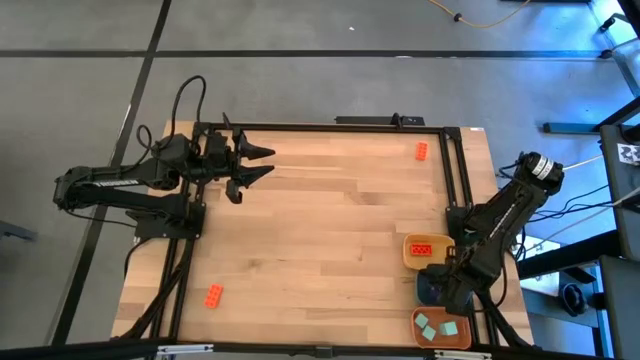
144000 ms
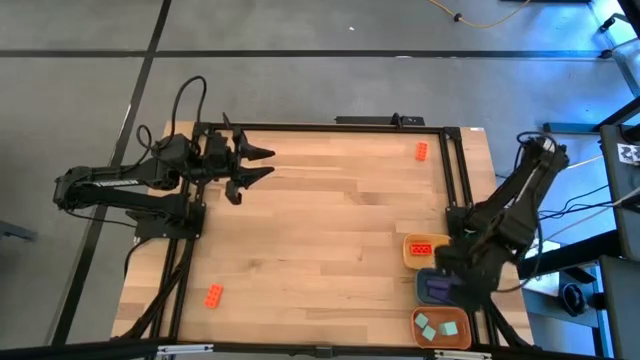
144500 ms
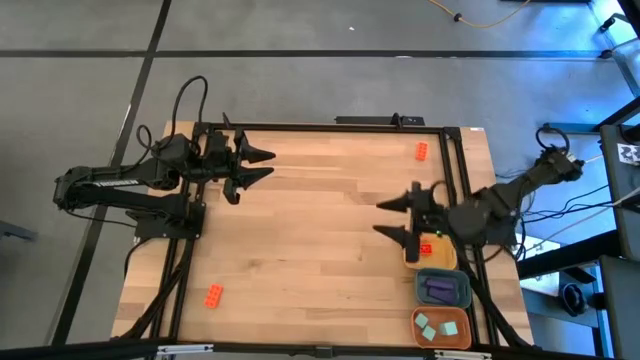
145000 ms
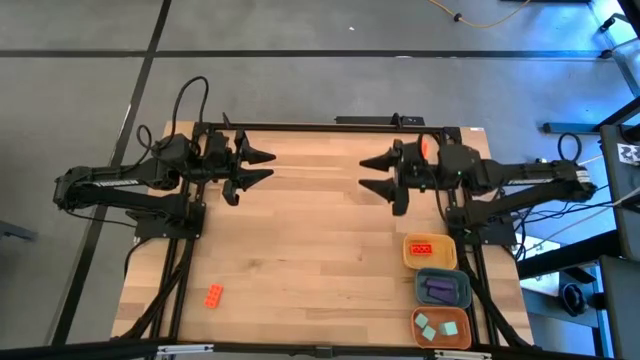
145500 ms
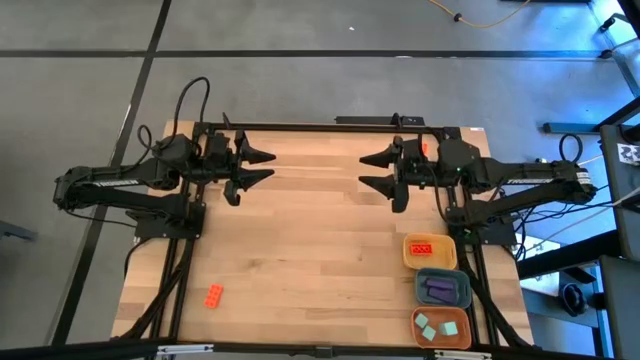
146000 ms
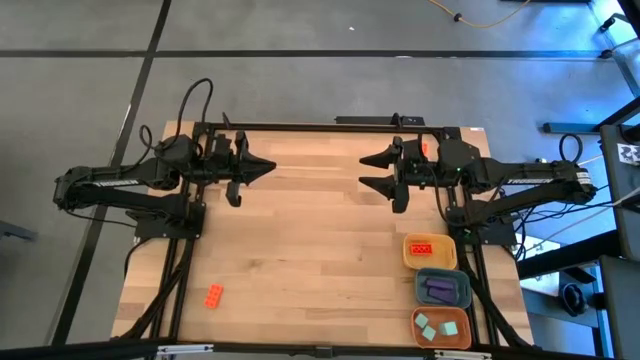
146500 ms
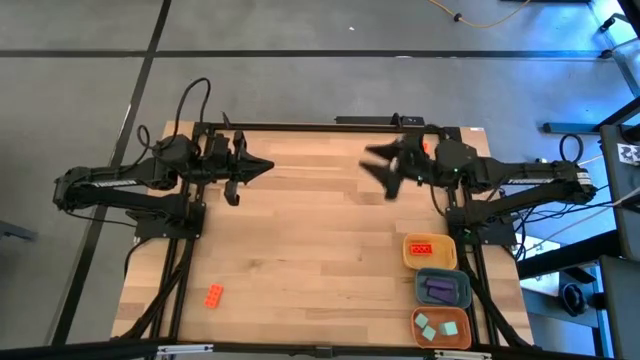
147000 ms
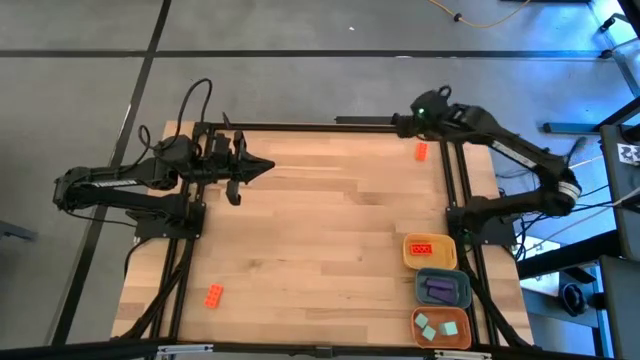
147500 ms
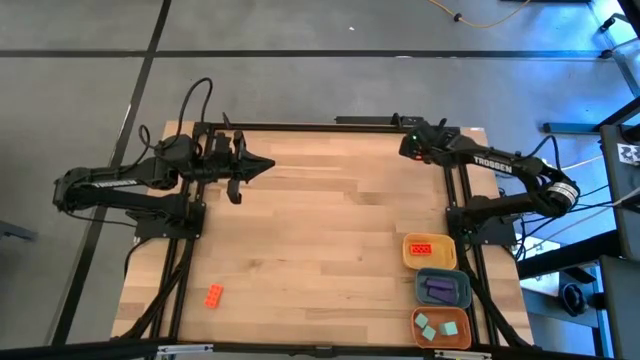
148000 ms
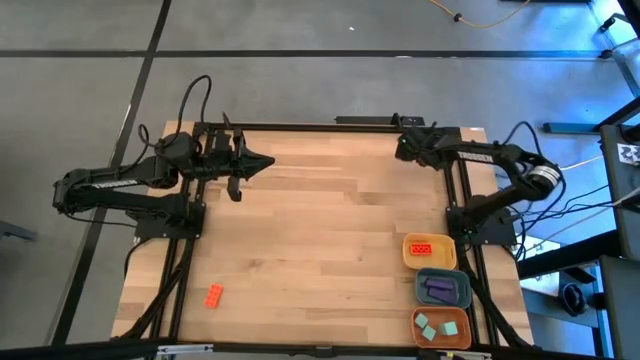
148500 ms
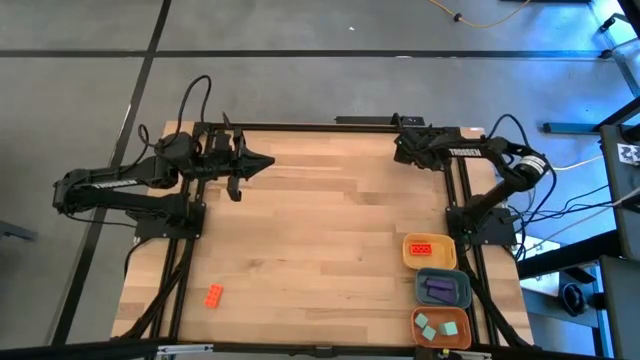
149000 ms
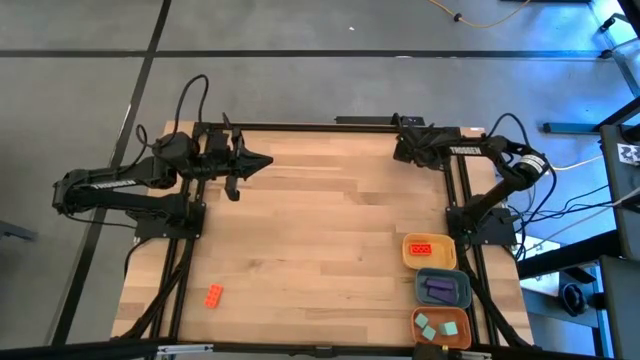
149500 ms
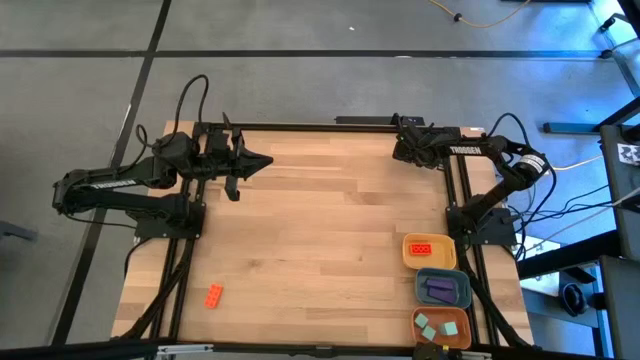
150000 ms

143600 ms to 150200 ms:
Task: Sort & place blocks by color
Put the top orange game piece into the yellow bin

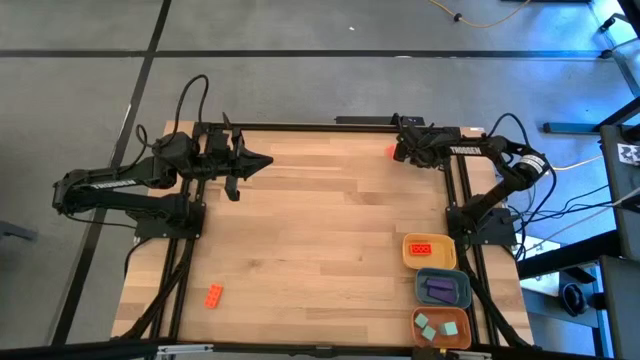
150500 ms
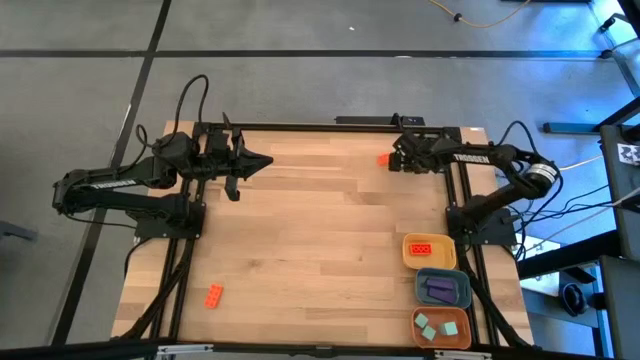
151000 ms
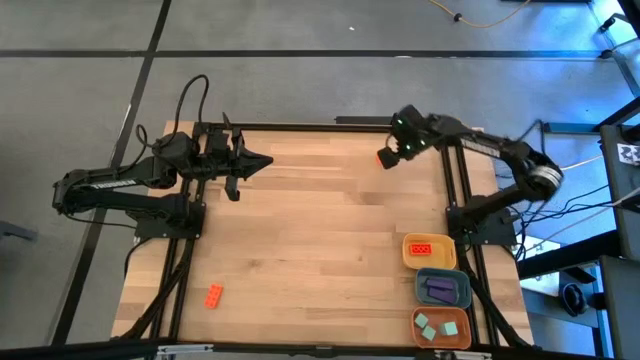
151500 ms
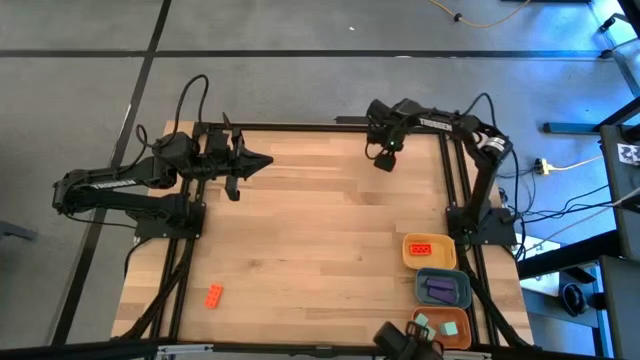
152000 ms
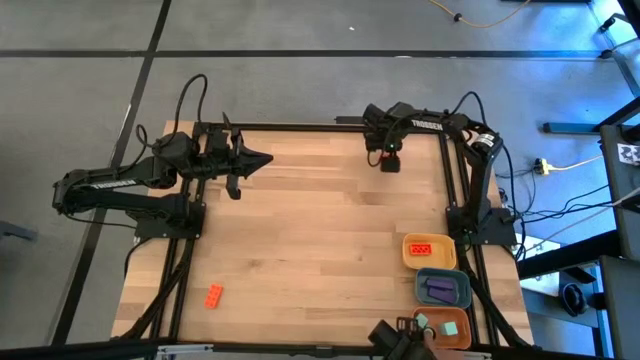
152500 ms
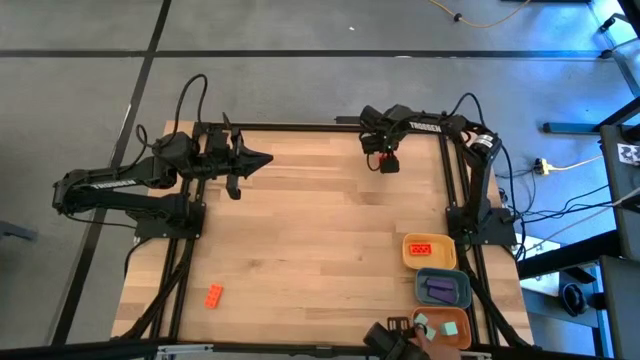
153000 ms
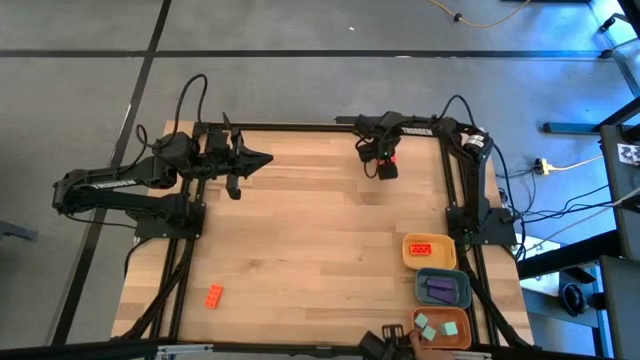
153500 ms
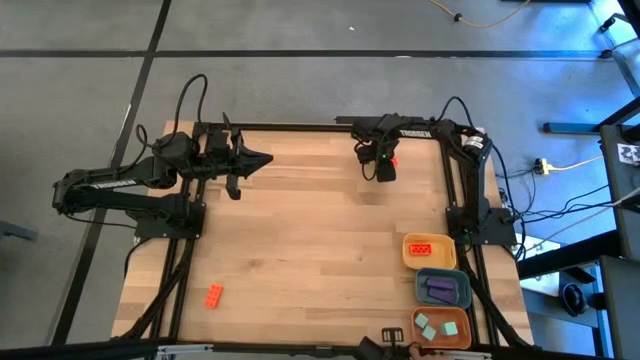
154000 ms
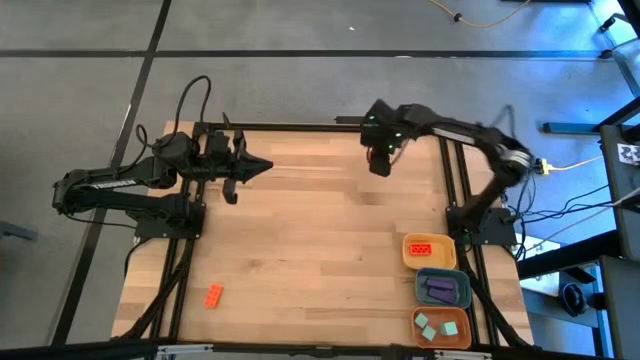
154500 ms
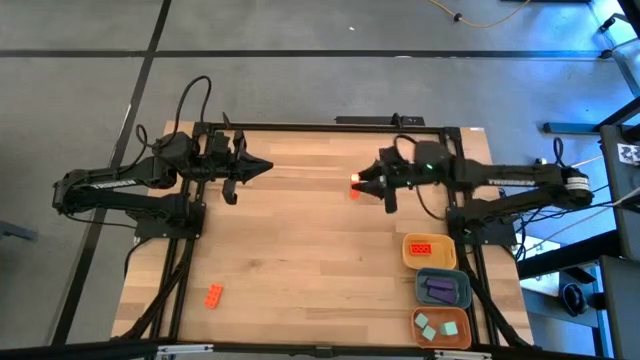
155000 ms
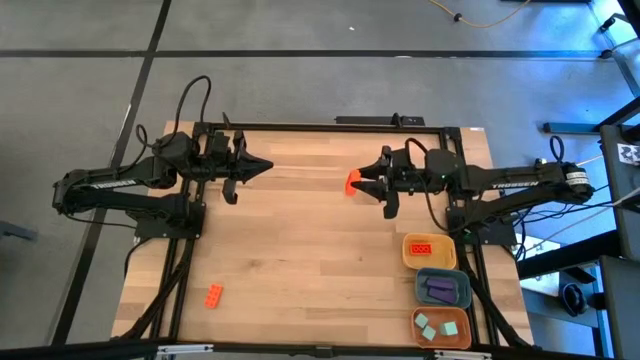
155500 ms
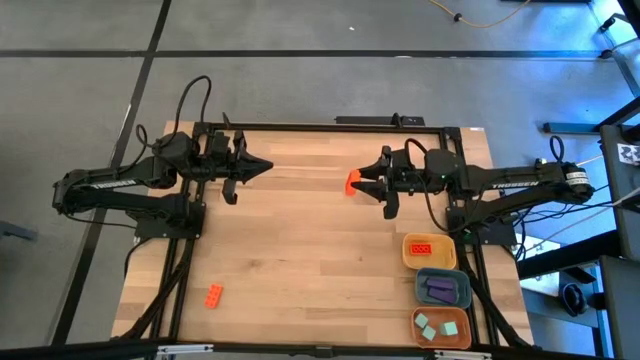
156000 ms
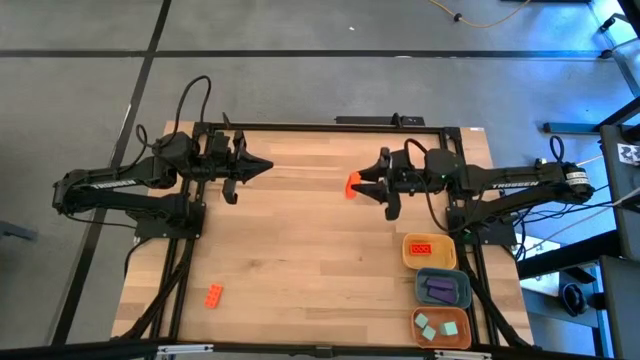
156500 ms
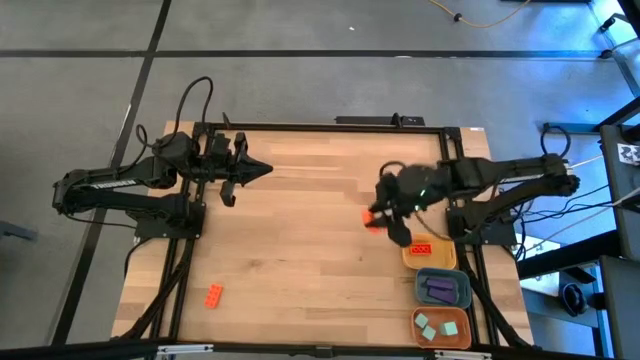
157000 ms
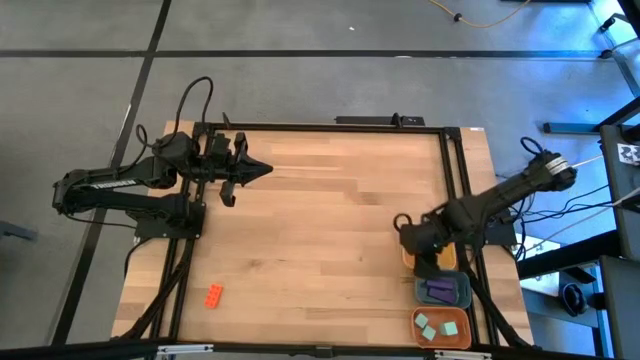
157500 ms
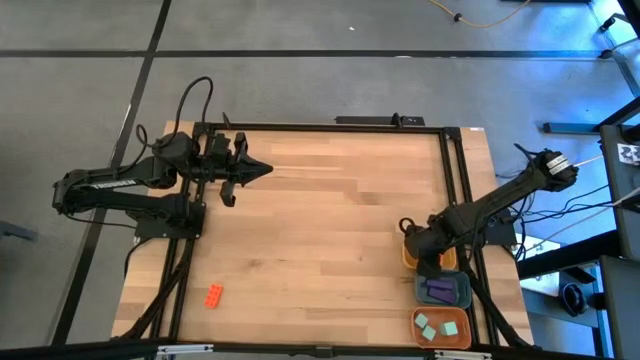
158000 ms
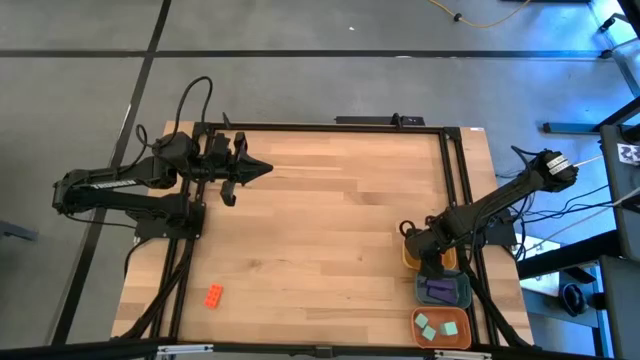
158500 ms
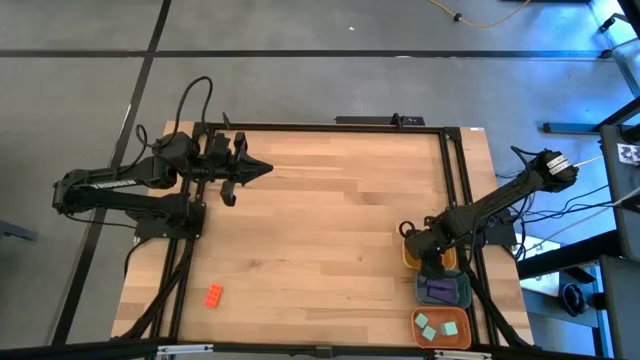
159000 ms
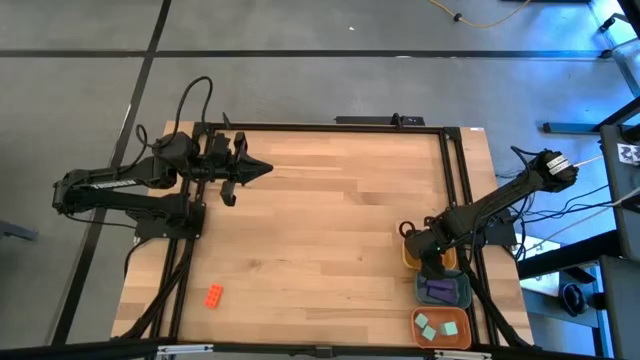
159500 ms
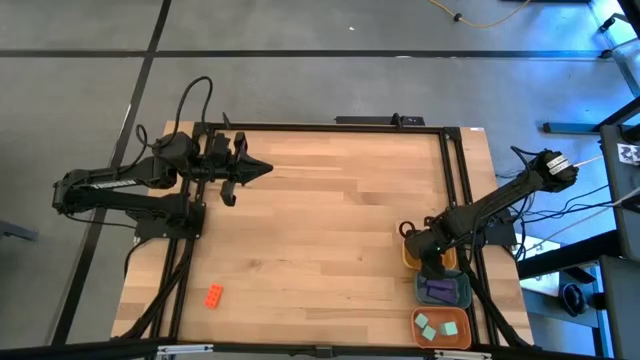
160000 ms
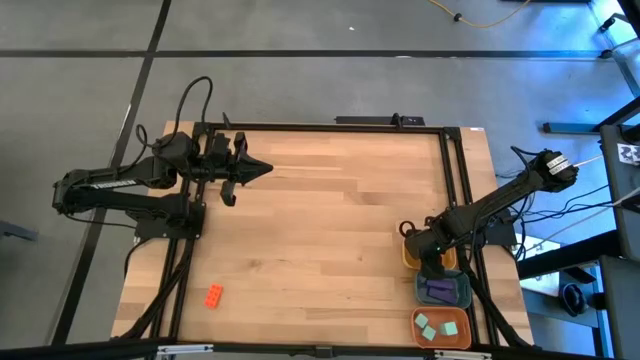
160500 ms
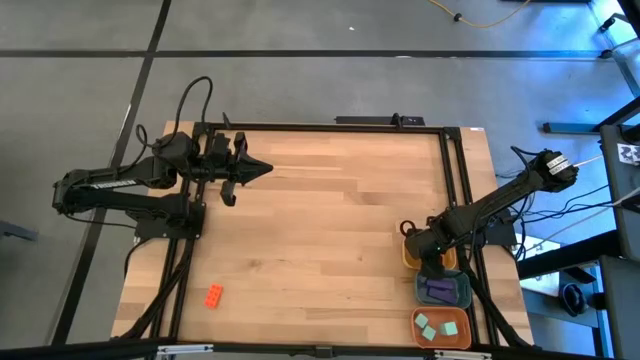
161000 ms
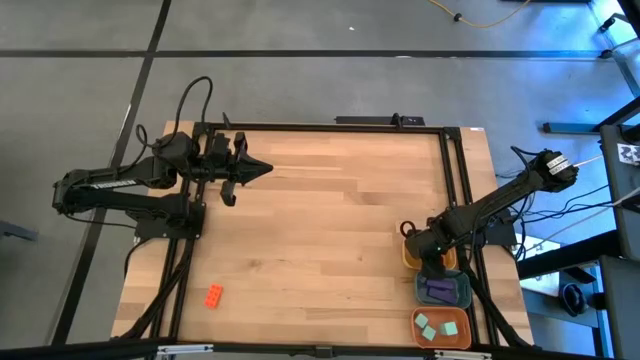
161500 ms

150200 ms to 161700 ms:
Put the top orange game piece into the yellow bin

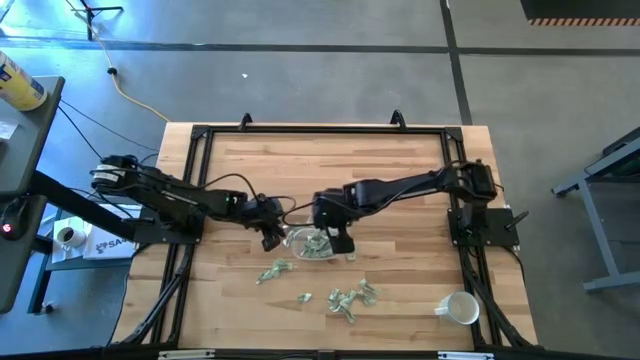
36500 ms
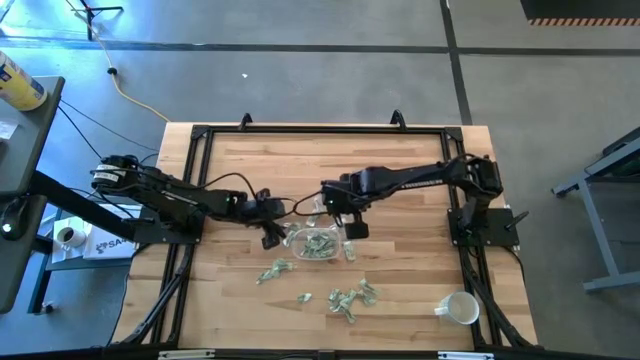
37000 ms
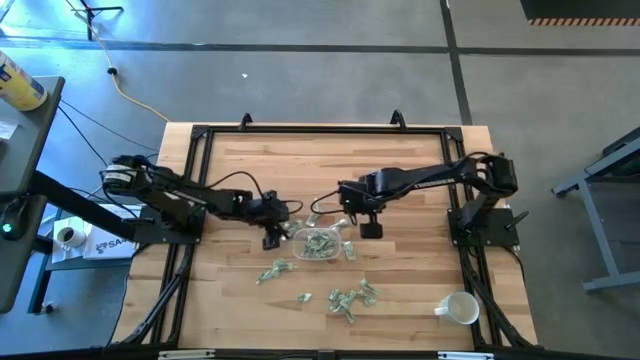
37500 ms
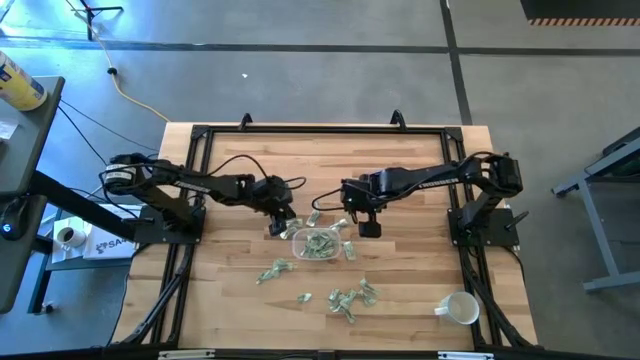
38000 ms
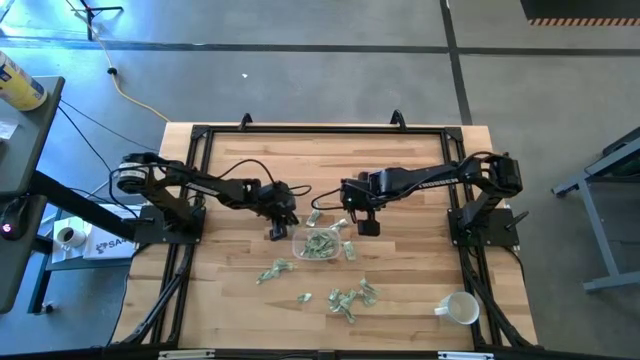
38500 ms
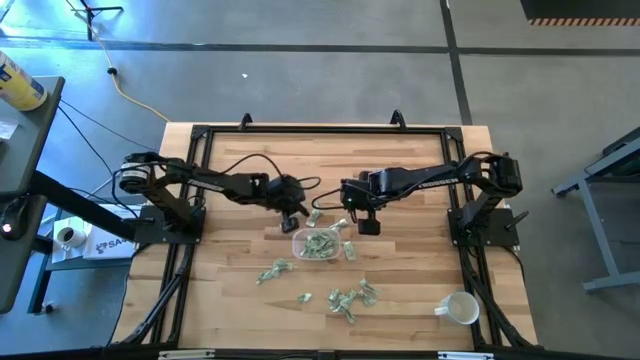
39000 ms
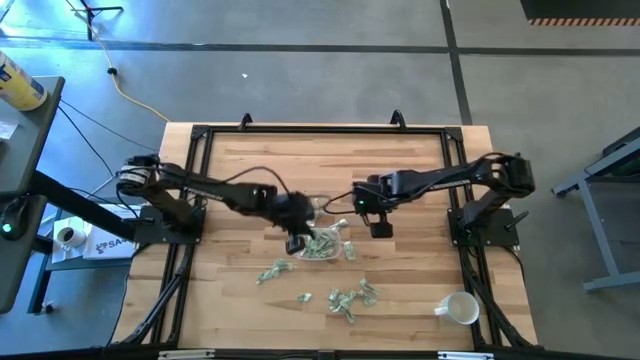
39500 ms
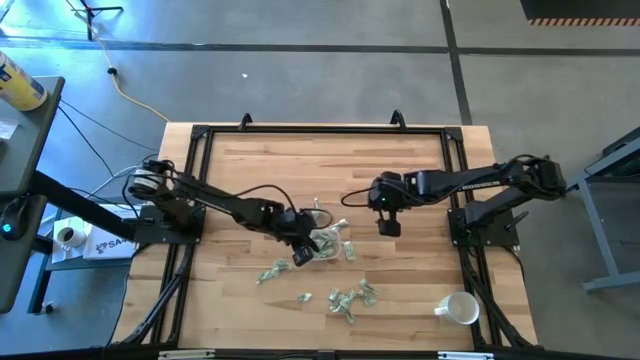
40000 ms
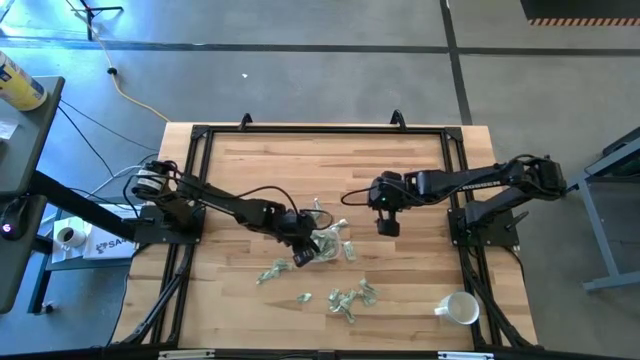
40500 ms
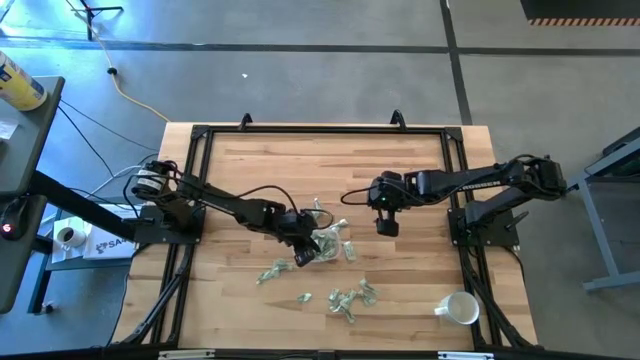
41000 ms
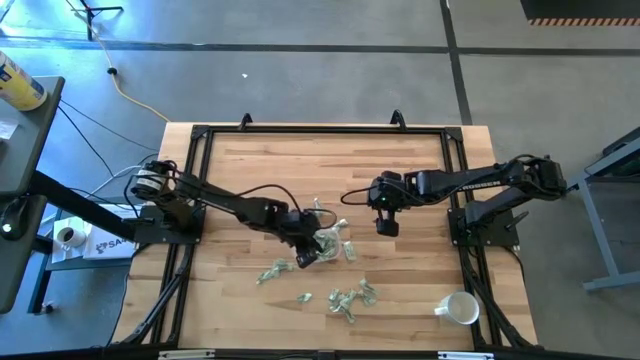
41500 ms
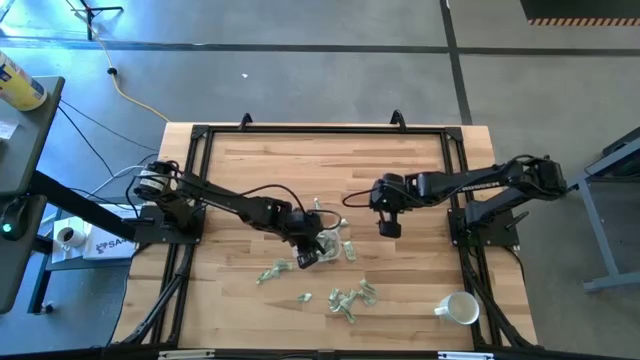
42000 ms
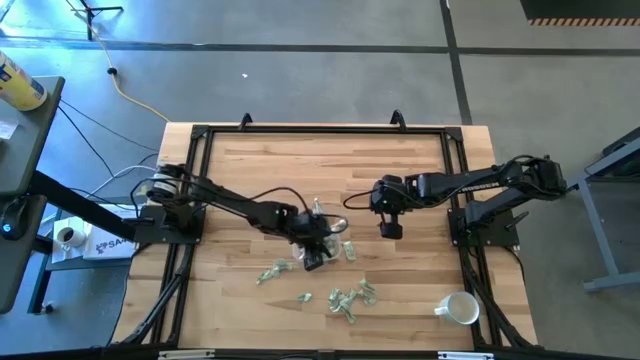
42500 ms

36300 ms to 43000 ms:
Task: Pick and place Stevia / Truvia into bins
Put the green stevia packet into the transparent bin
